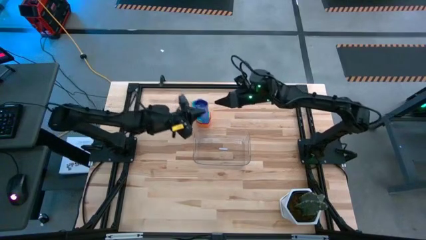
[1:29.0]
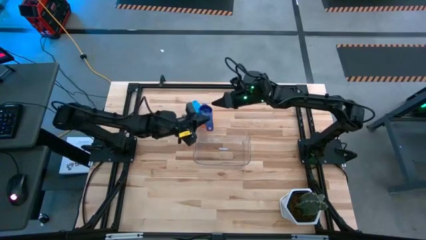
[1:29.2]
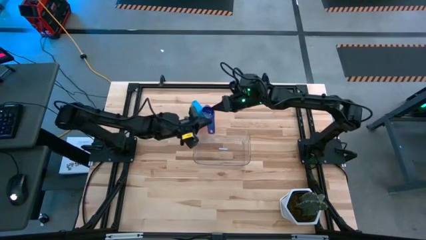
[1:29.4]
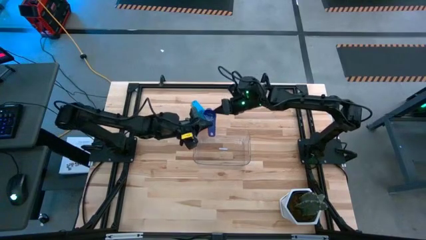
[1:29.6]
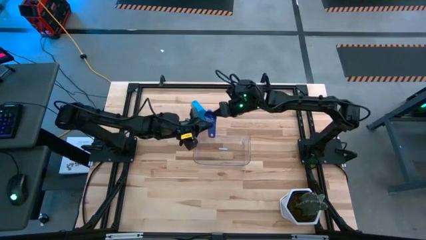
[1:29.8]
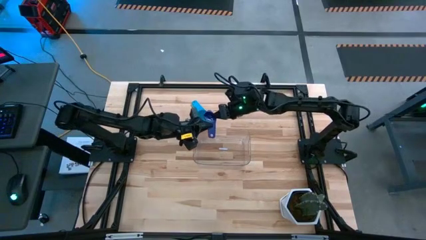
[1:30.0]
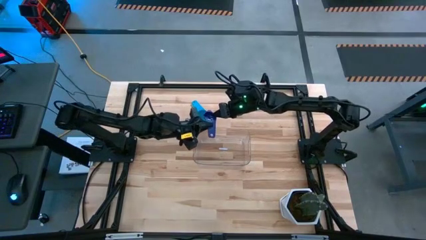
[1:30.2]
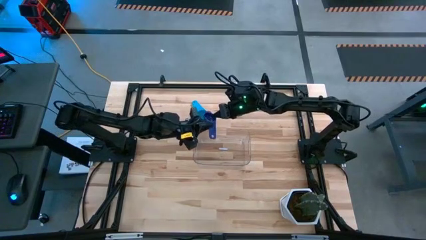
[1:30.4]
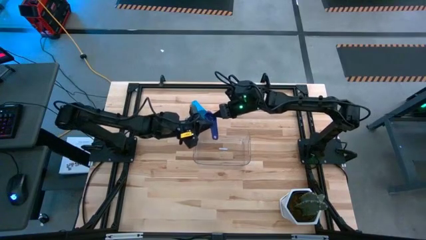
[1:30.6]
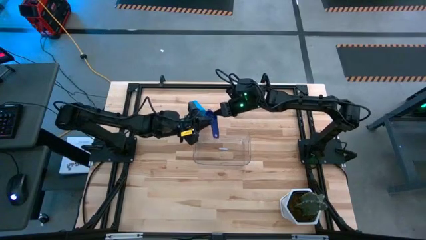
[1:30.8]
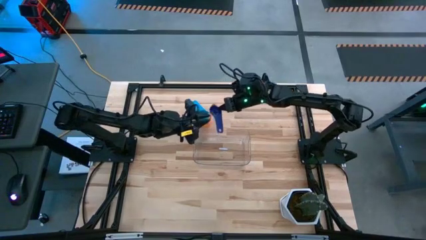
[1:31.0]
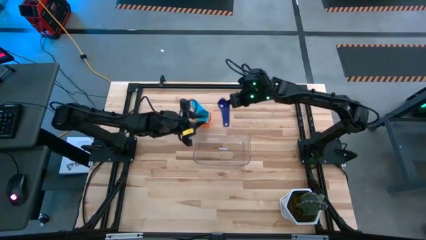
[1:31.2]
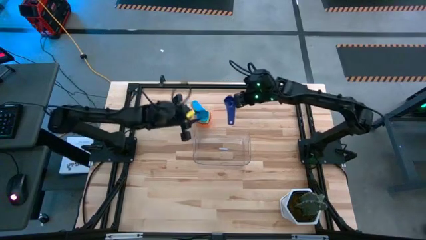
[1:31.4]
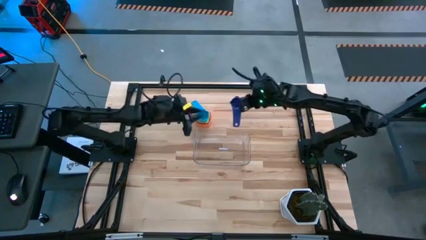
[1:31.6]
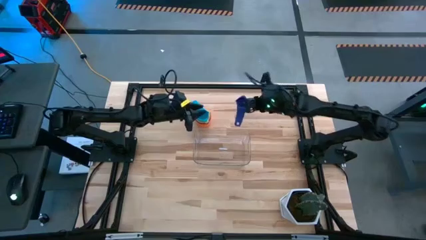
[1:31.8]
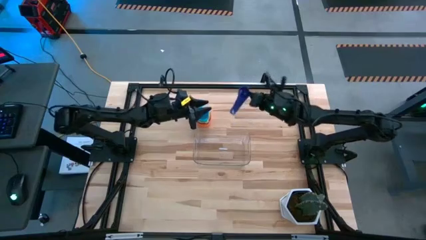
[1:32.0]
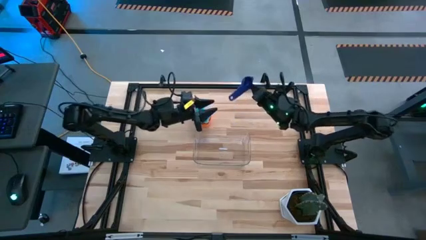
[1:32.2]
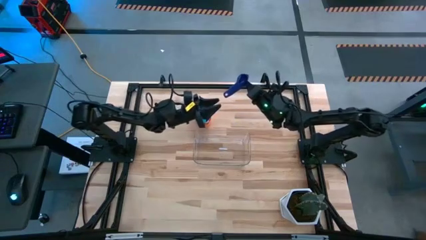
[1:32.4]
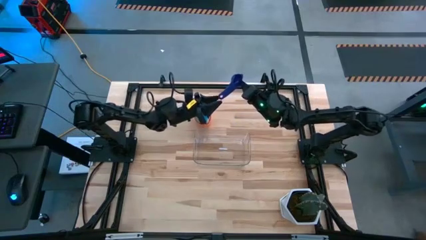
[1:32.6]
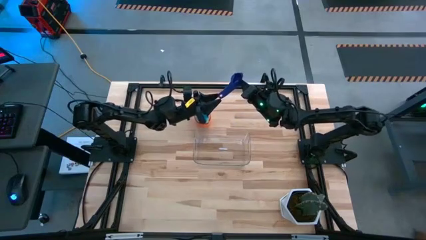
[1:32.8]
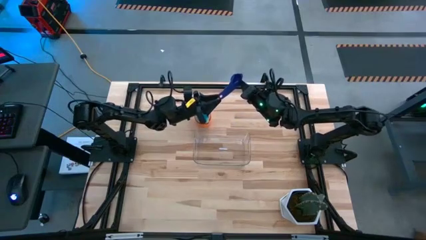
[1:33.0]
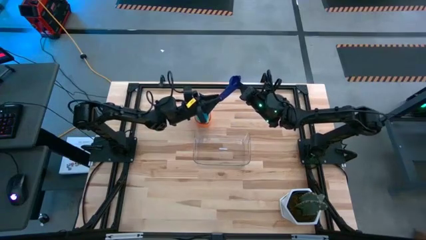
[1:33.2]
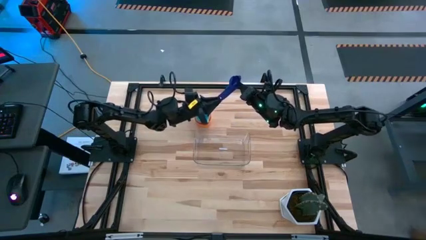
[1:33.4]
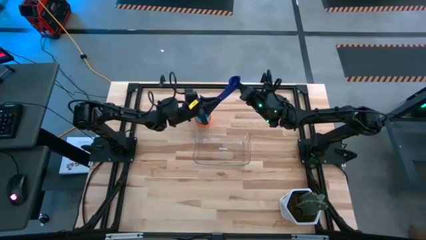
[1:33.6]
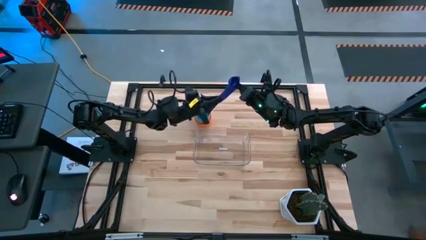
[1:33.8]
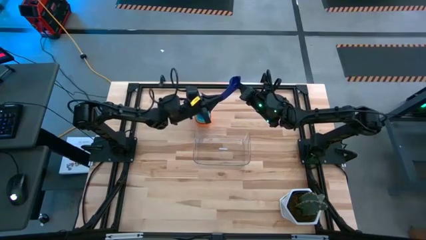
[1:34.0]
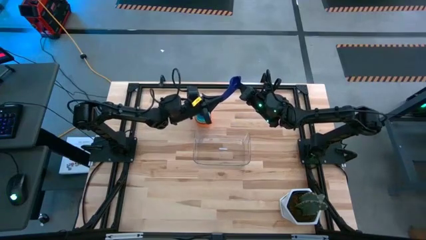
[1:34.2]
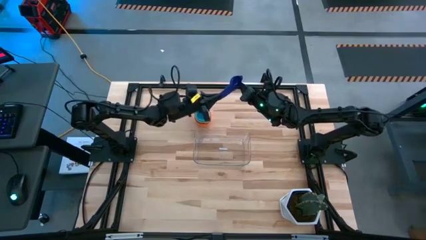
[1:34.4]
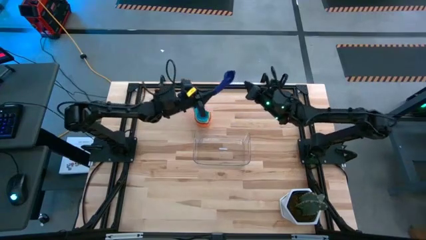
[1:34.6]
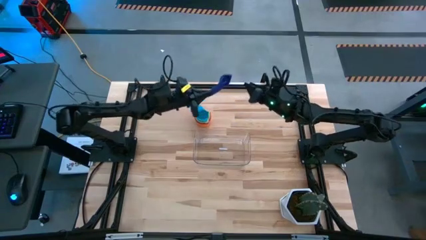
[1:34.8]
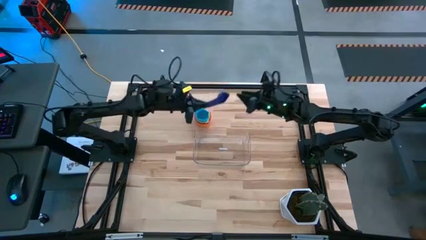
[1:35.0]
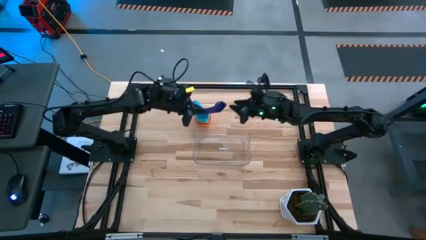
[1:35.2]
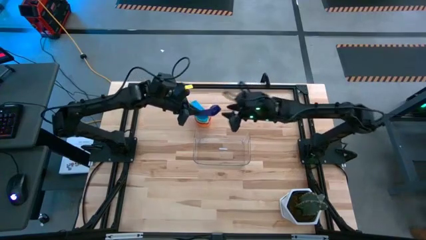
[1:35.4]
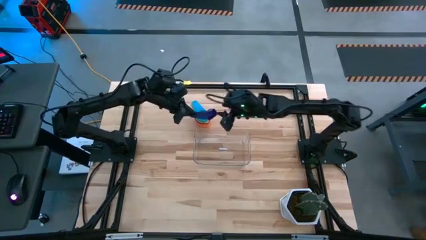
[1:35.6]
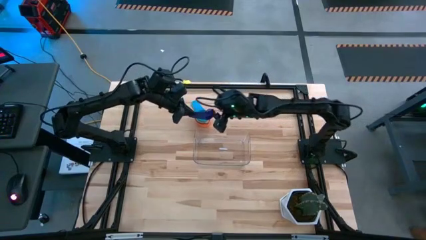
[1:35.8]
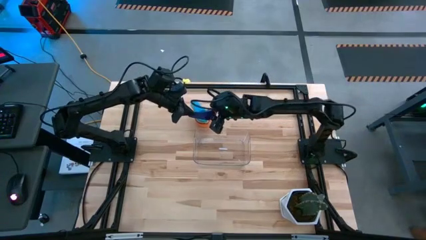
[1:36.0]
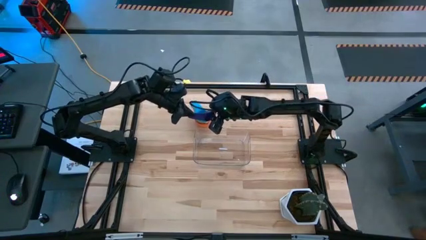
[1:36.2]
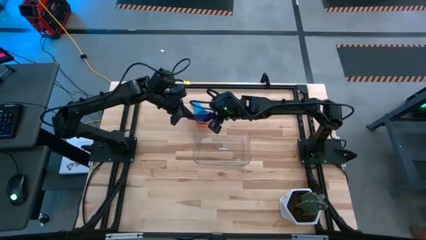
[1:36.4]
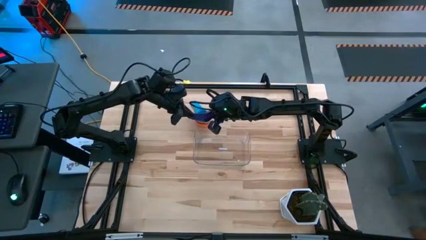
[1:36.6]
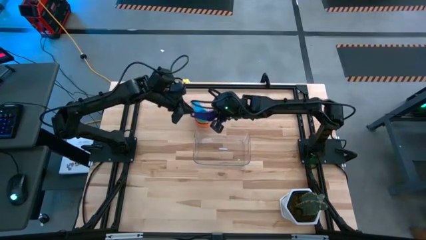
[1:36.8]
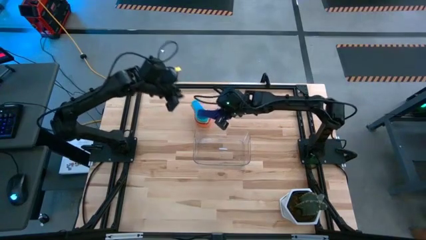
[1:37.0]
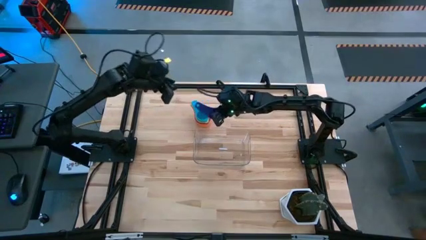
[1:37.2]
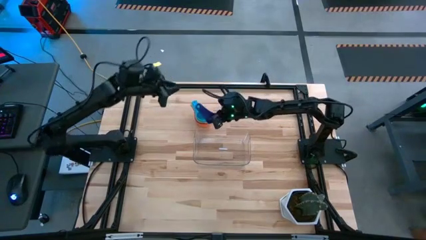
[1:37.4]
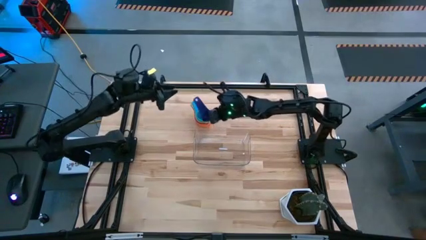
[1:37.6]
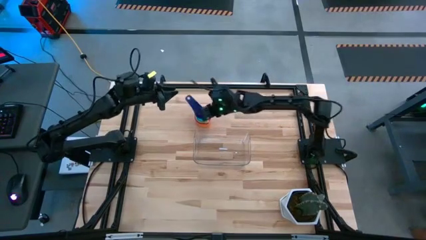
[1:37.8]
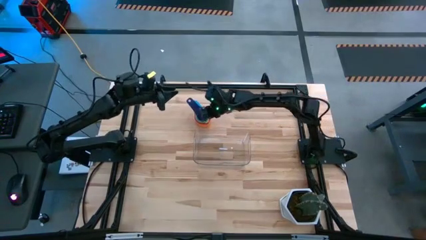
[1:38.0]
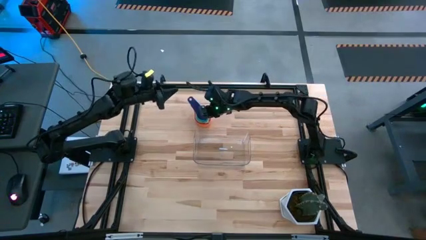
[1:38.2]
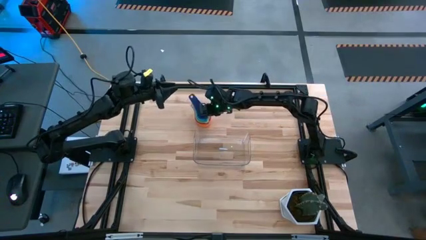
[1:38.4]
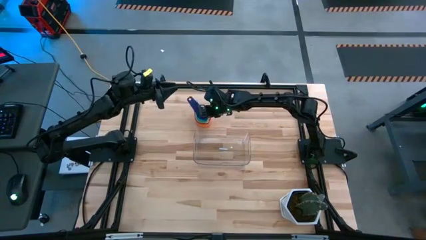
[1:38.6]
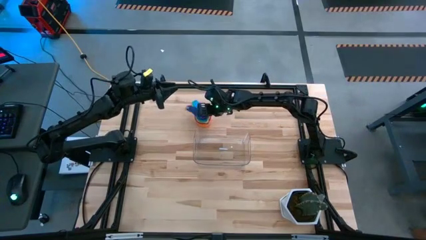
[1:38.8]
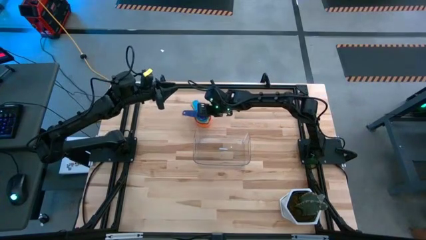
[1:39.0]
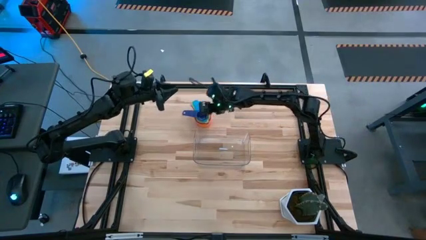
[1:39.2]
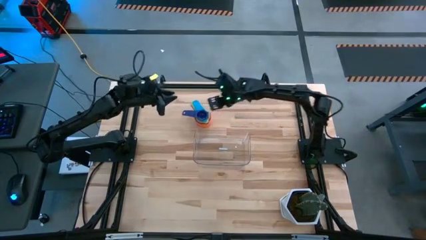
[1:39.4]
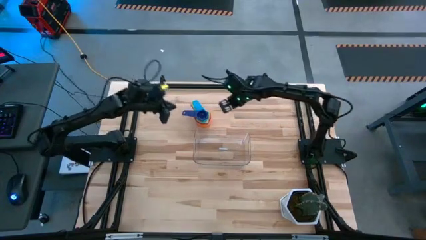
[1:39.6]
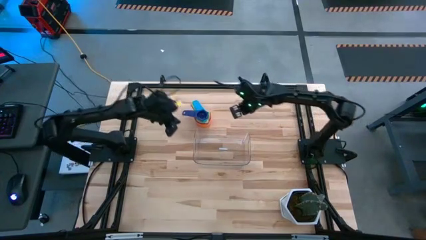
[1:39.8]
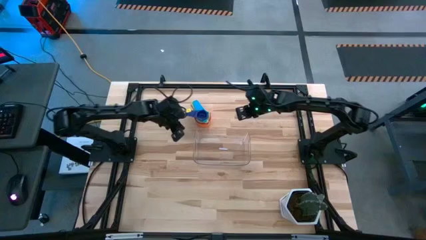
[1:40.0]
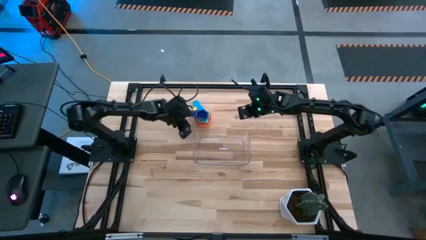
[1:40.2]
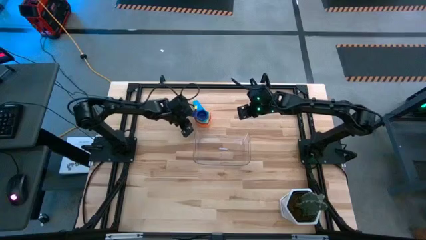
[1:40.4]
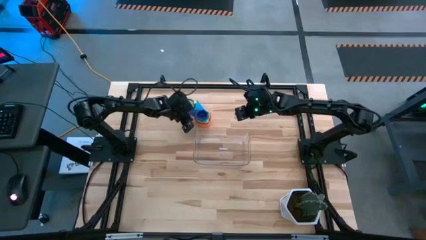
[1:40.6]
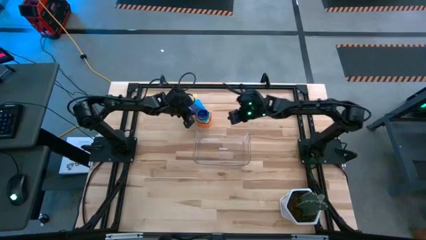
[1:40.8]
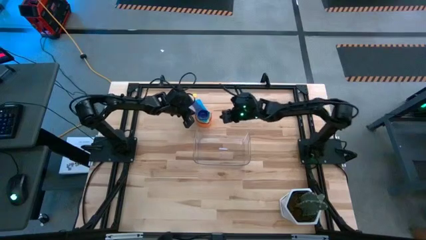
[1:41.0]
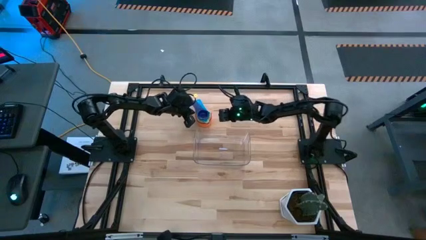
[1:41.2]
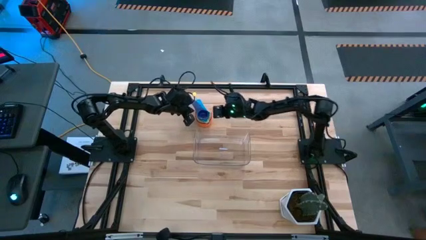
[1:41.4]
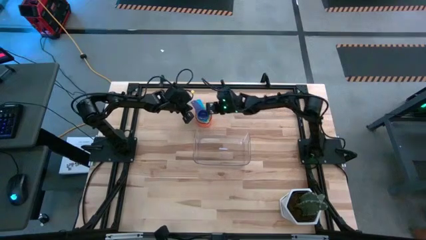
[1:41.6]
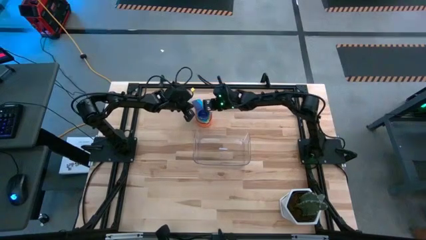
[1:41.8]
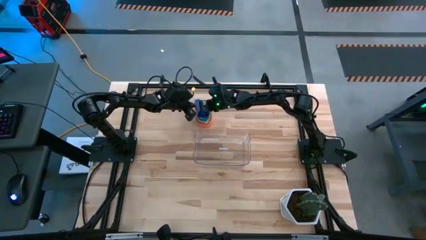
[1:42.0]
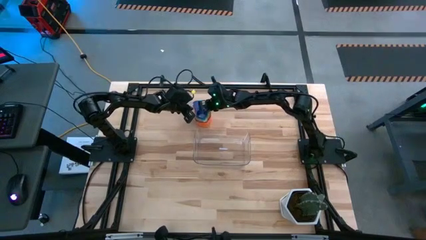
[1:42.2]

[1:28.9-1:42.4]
Task: Nest measuring cups in basket
Stack the violet measuring cup on top of the light blue measuring cup

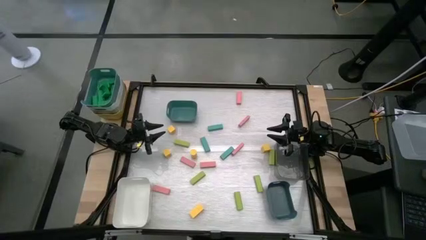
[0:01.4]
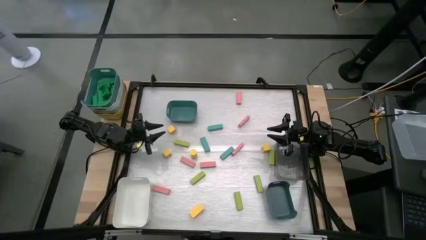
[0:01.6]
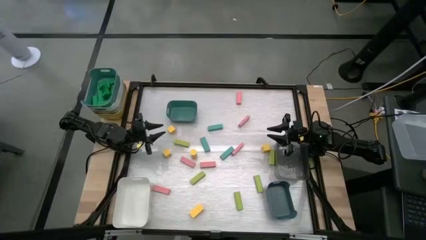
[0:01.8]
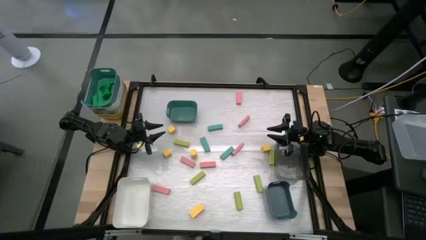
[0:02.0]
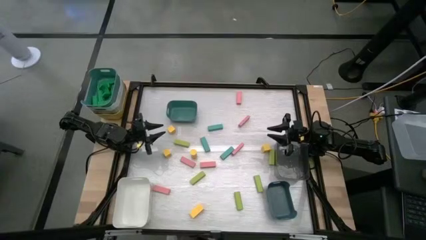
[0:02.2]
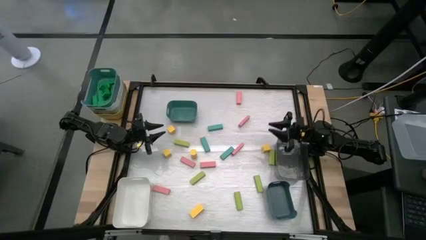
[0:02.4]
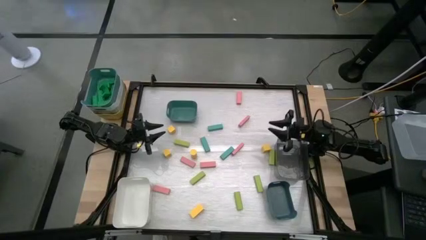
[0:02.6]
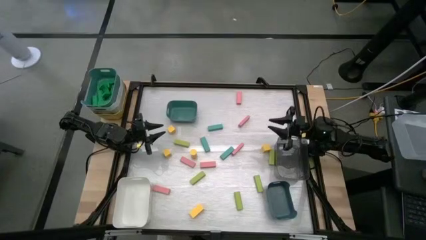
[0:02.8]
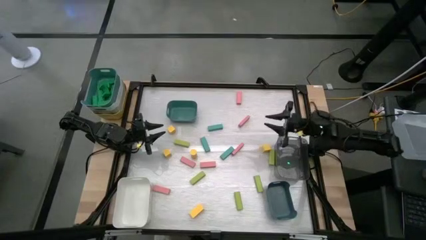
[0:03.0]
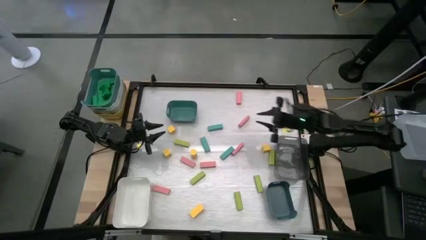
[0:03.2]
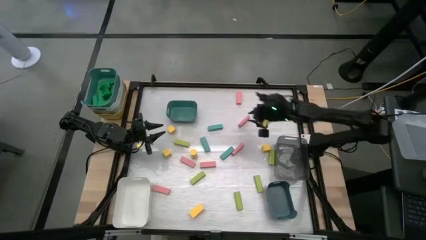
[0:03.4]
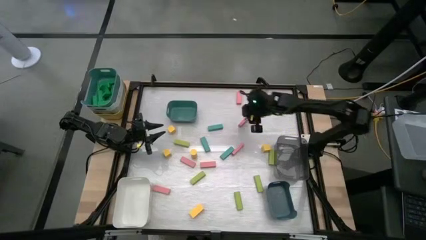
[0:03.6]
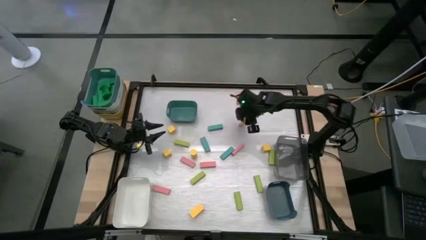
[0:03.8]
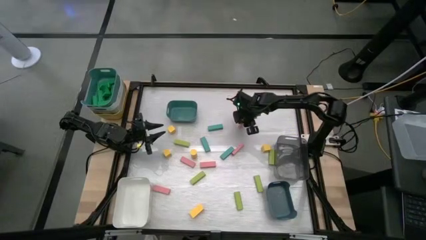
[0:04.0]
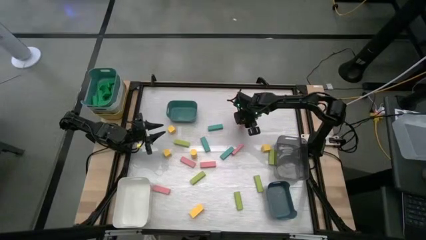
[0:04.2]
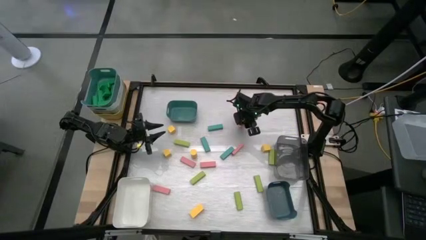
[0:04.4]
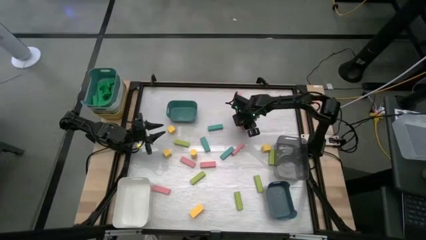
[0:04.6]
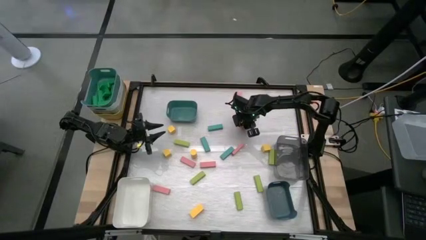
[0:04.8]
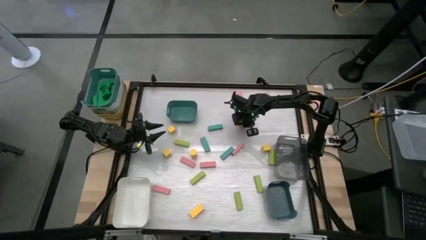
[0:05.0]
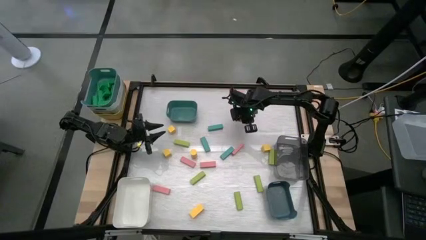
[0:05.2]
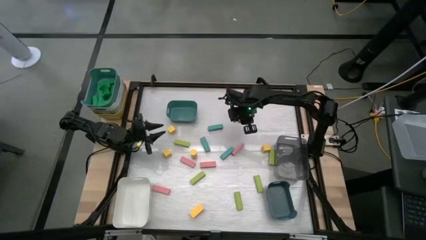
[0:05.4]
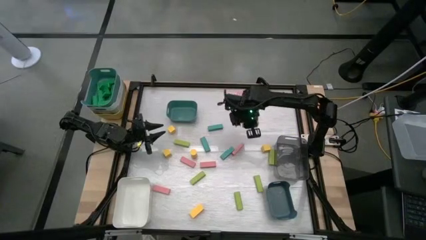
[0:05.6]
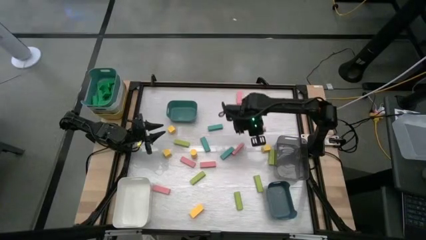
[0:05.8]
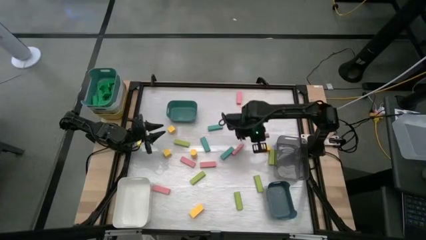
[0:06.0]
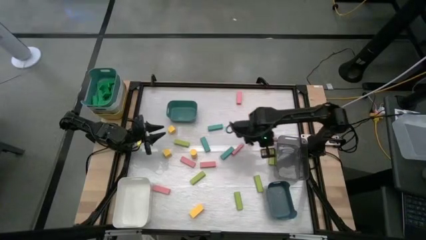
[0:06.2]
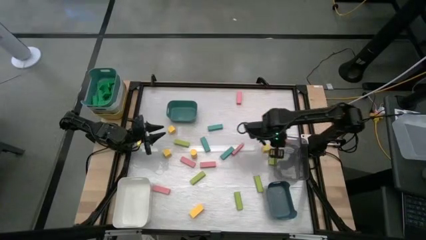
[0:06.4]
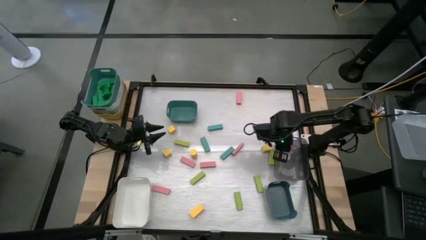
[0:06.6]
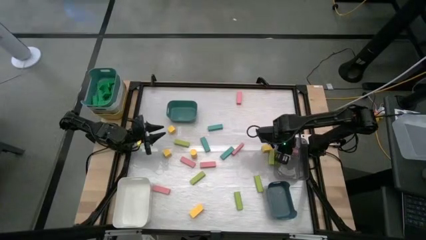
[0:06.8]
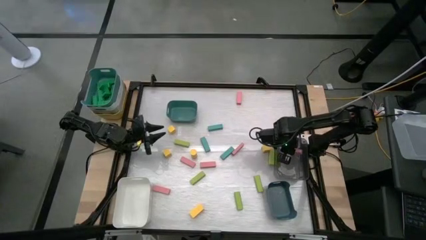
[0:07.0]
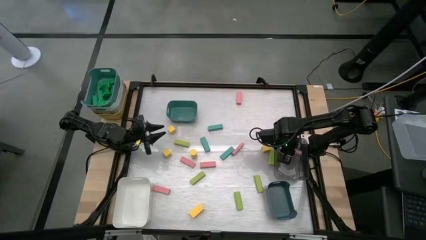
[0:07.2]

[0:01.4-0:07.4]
Task: Sort blocks
Put the pink block into the black bin
